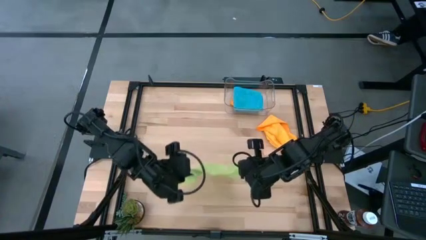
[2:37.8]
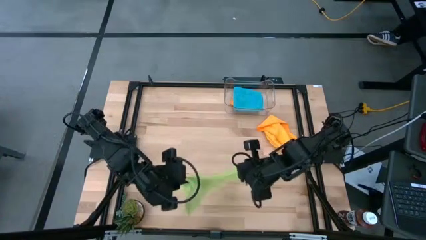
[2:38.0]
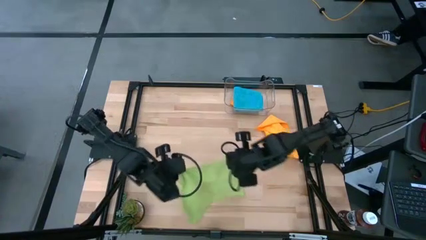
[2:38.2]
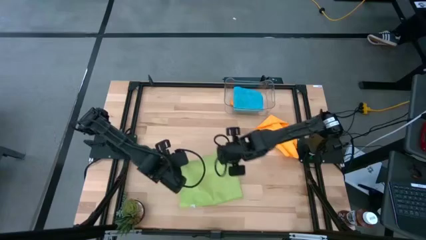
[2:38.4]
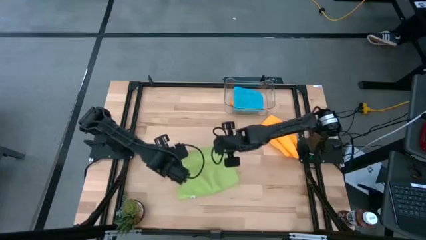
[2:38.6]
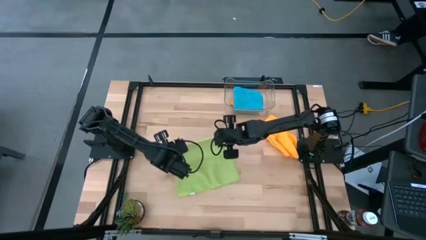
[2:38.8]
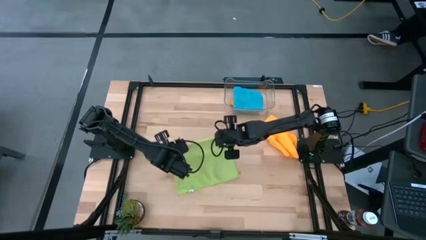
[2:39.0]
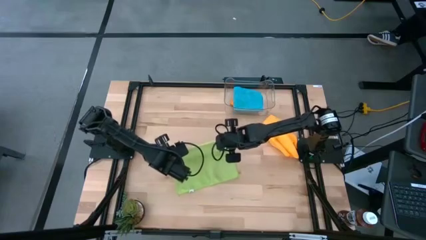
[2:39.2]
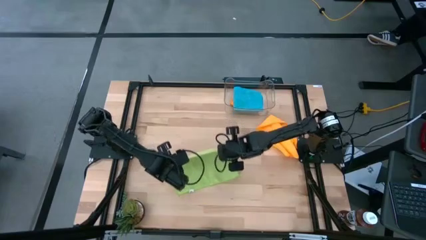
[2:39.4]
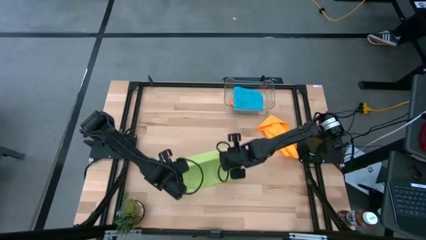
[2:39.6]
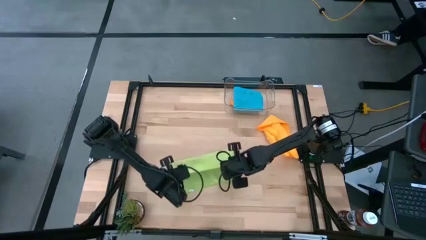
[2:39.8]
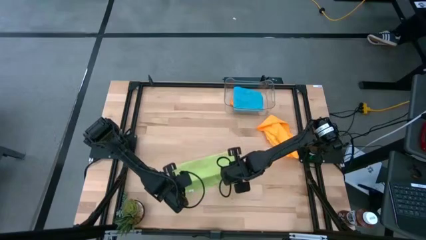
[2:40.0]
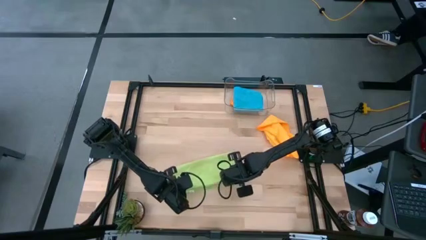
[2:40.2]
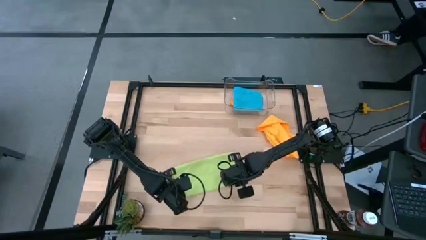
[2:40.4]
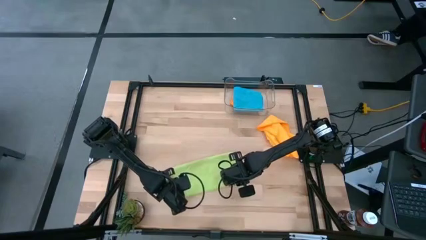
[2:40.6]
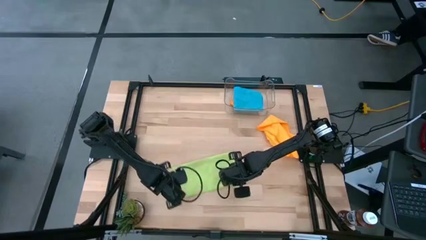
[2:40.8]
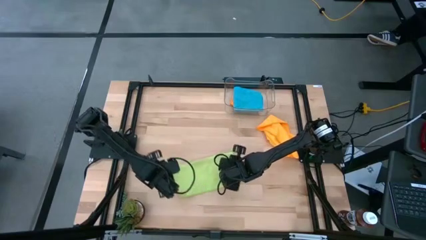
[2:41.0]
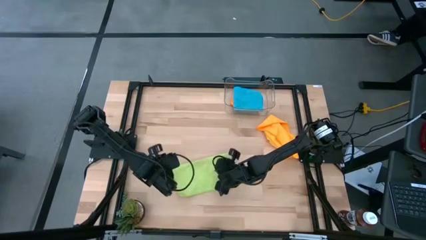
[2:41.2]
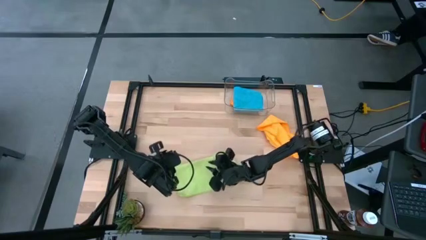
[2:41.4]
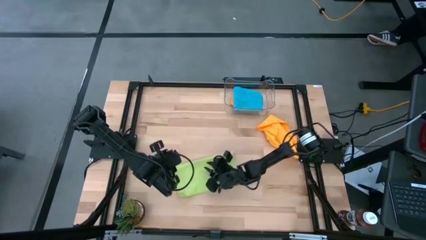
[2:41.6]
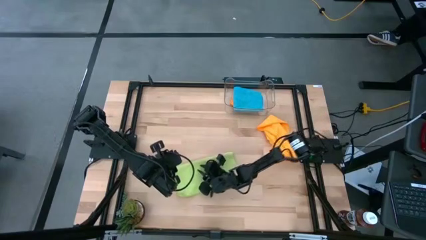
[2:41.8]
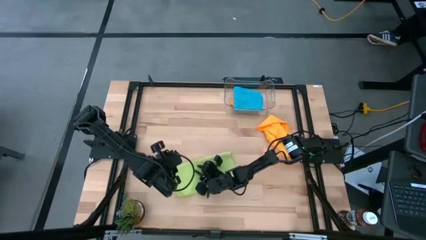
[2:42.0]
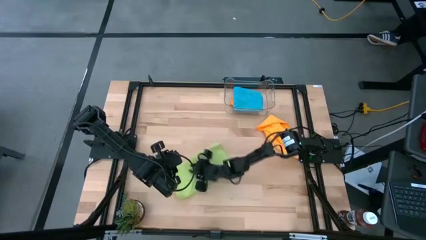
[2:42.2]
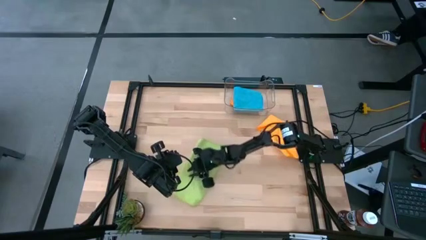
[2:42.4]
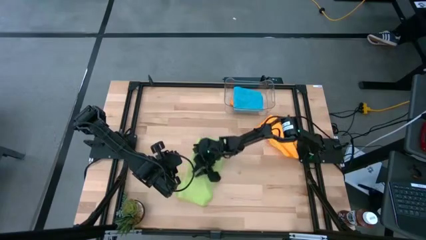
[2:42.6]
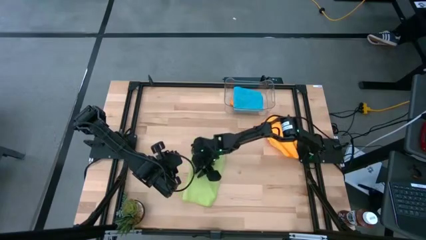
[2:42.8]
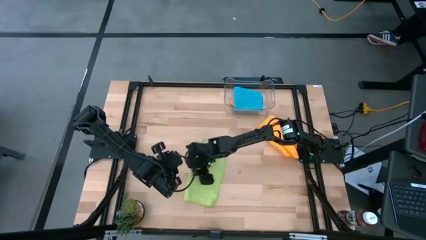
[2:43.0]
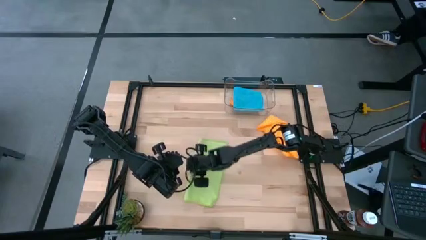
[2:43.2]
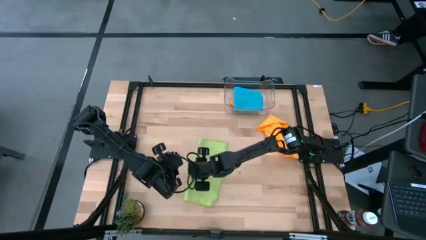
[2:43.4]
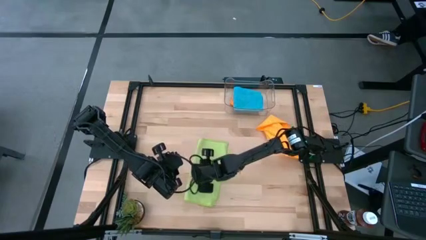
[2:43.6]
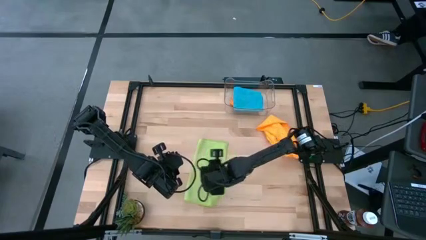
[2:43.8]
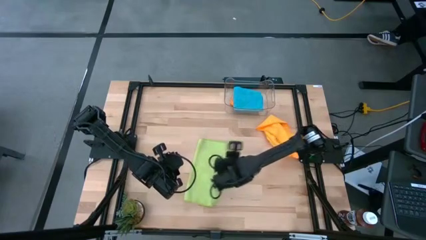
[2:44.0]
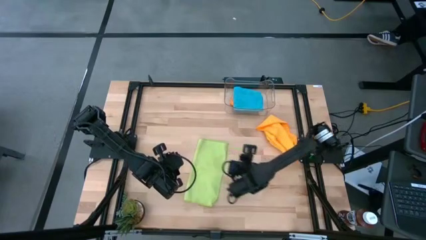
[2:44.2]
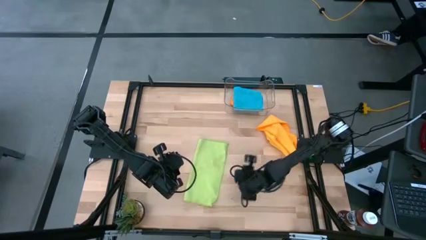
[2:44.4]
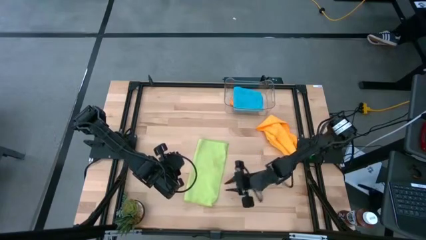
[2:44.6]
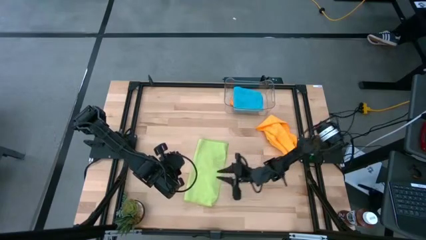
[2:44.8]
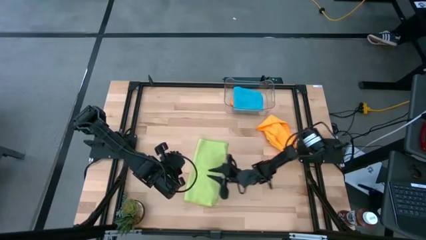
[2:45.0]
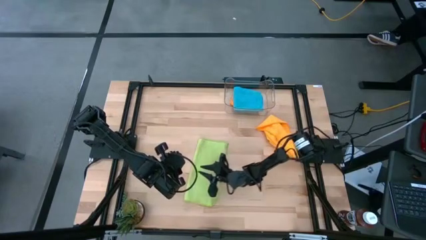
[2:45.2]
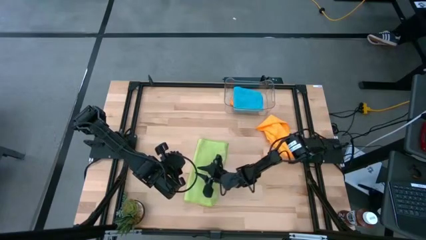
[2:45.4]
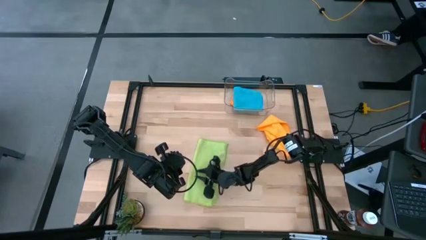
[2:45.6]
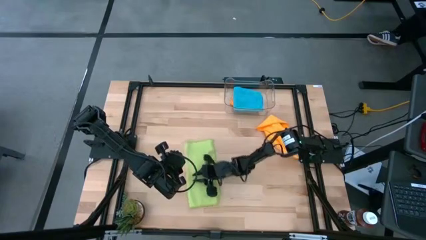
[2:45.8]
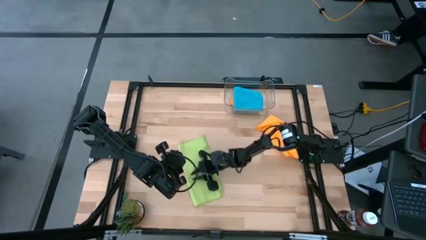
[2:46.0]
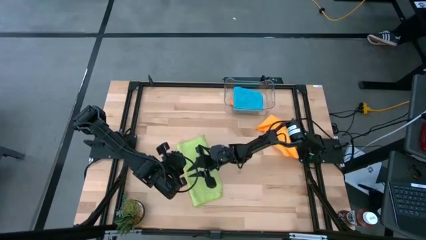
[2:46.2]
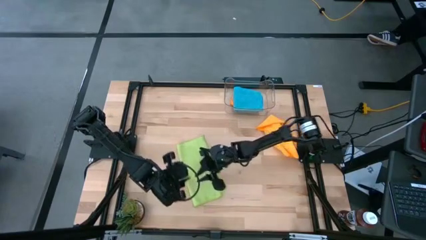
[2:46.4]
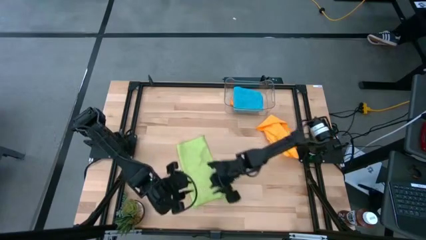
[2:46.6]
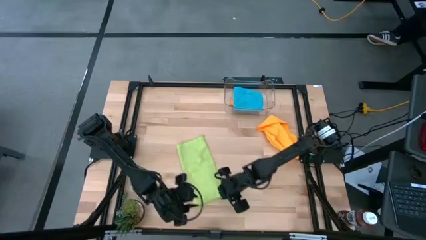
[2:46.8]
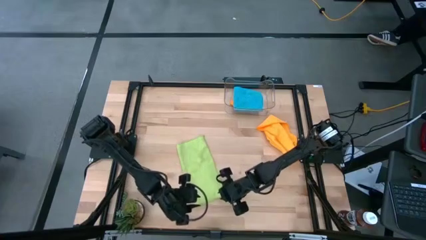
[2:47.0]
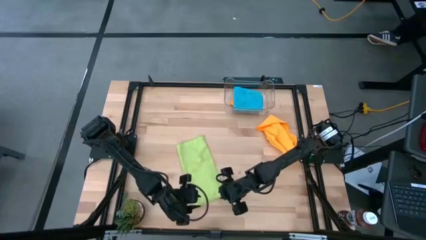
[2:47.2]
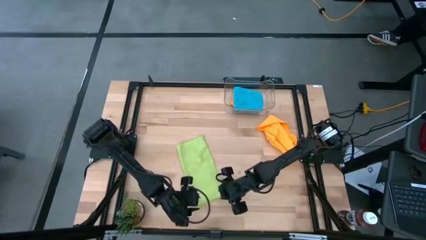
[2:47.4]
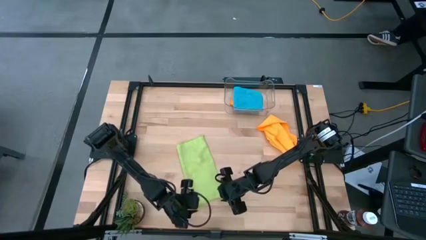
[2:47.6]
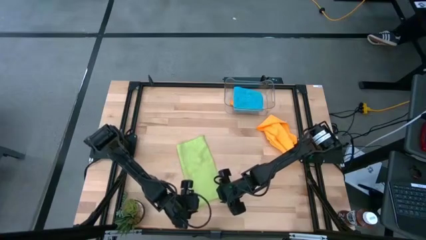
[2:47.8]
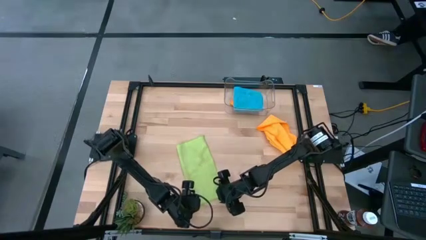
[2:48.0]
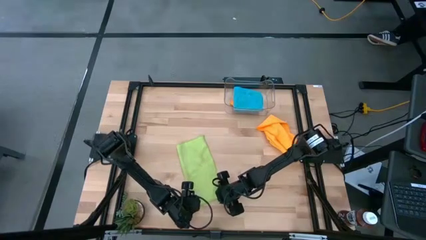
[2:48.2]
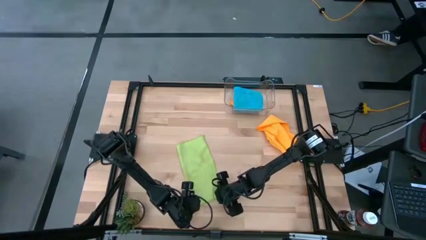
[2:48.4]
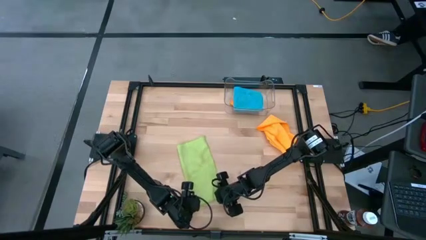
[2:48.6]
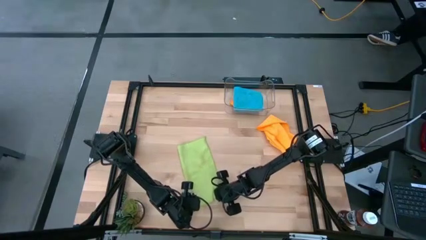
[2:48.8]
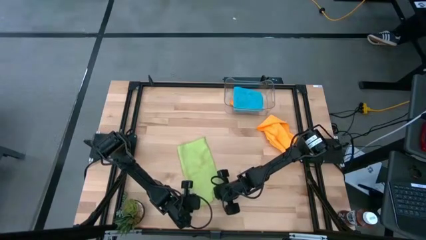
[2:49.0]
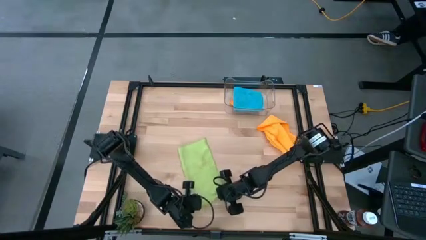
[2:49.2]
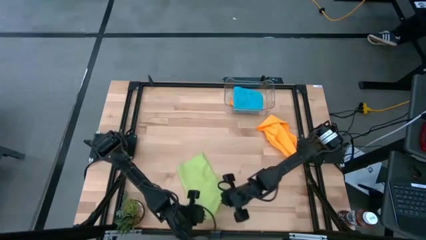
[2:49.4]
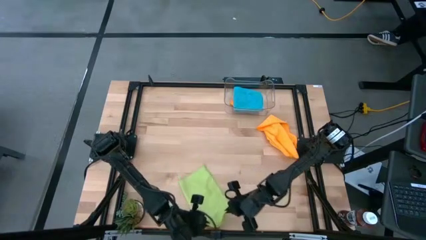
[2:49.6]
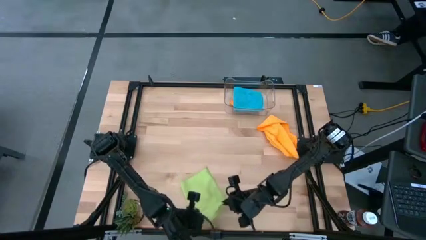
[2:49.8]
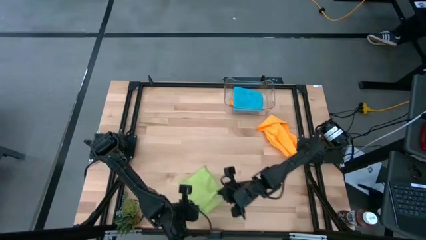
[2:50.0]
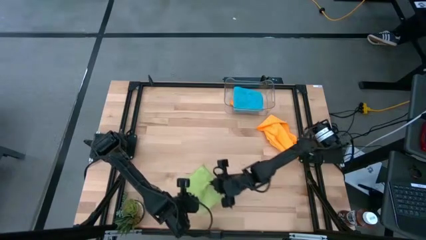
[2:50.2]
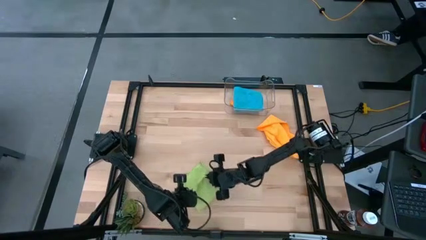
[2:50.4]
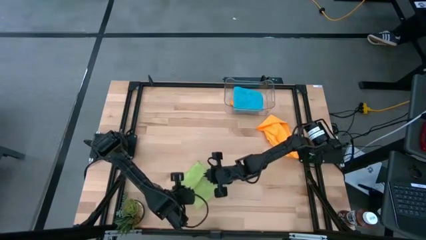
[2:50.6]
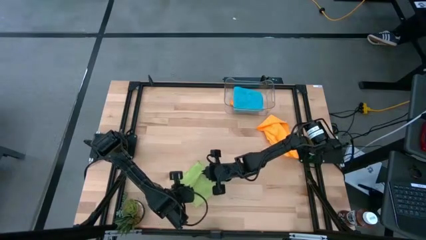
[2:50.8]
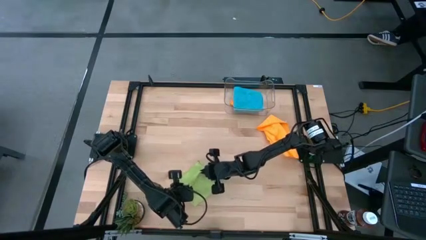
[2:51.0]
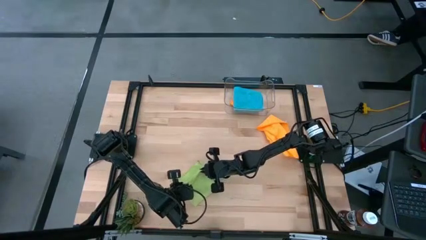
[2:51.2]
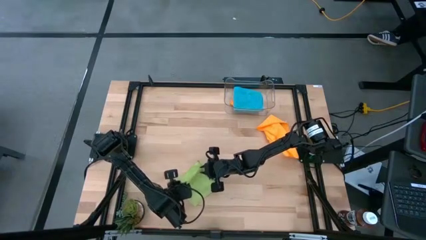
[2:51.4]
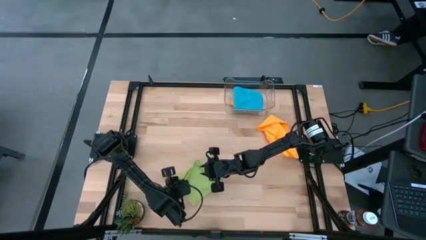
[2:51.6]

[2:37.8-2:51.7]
Task: Fold microfiber towels
Fold the green microfiber cloth
